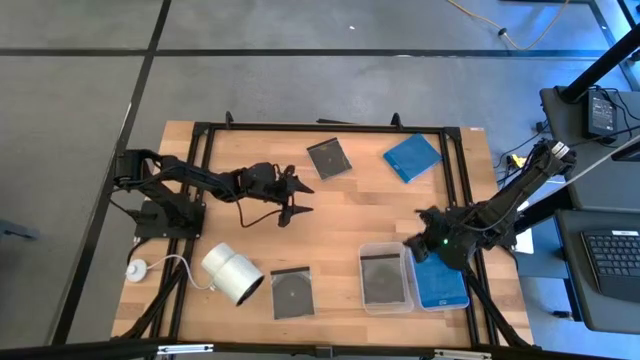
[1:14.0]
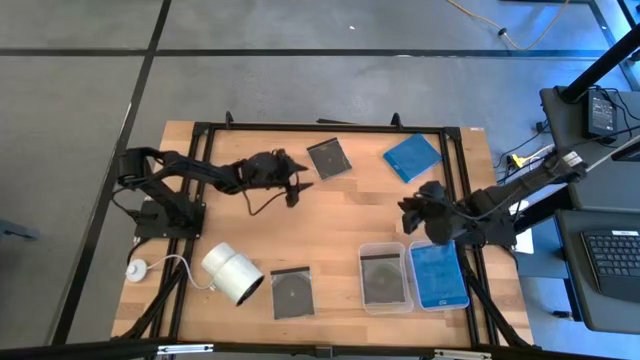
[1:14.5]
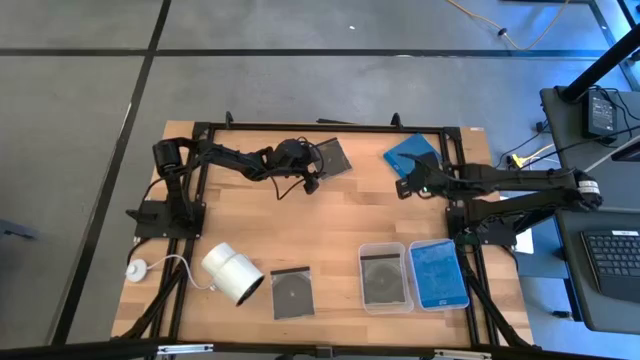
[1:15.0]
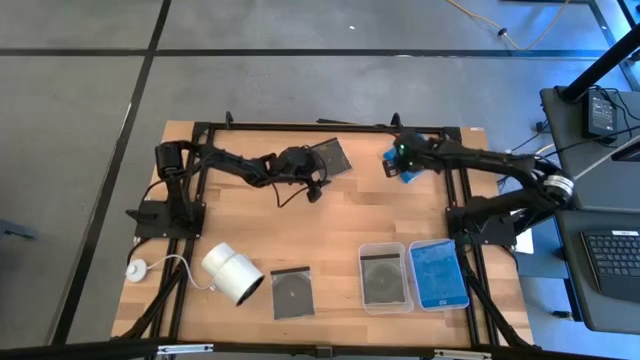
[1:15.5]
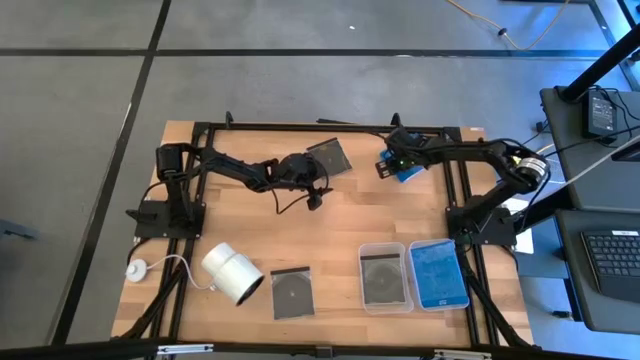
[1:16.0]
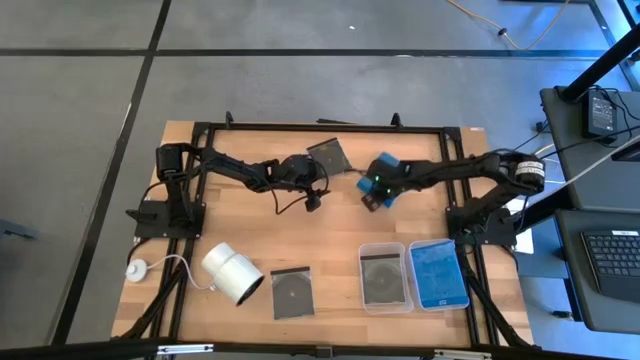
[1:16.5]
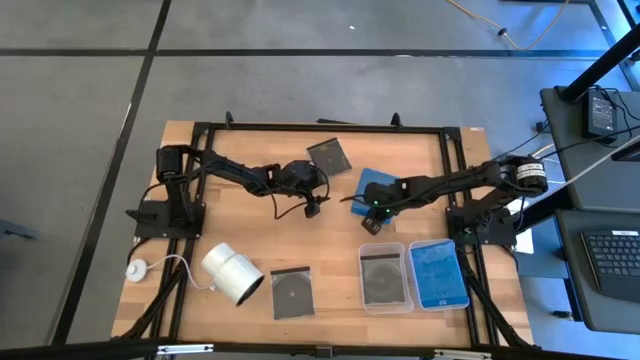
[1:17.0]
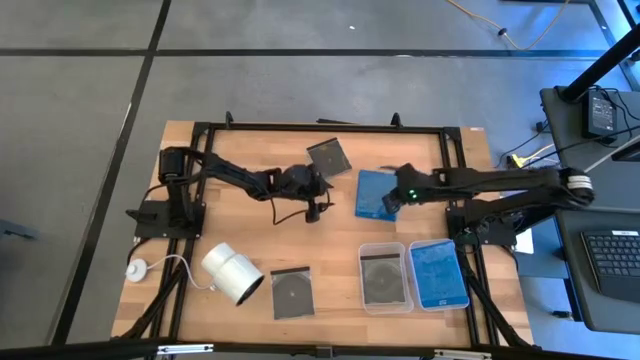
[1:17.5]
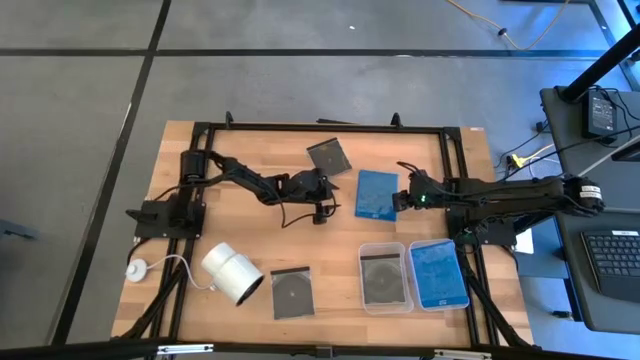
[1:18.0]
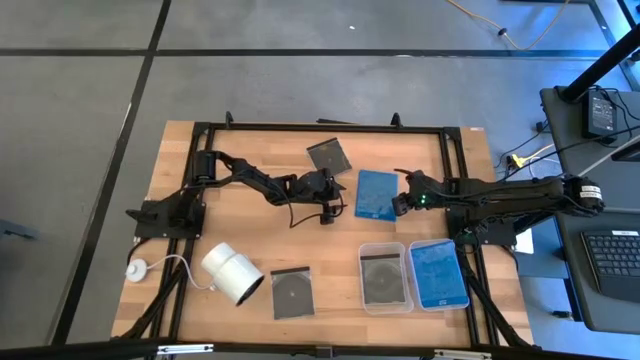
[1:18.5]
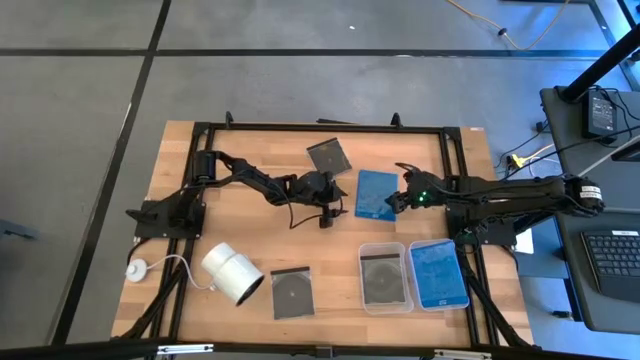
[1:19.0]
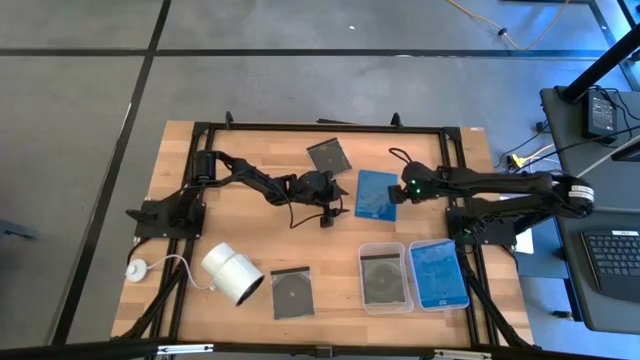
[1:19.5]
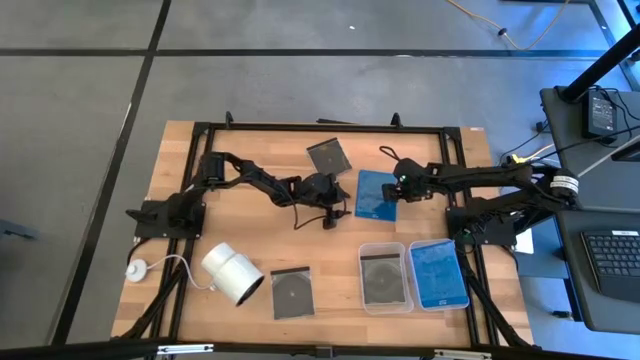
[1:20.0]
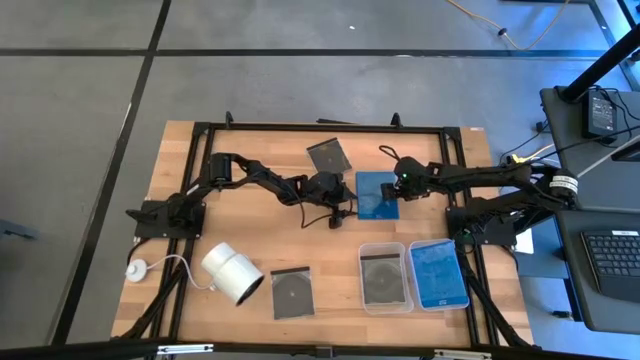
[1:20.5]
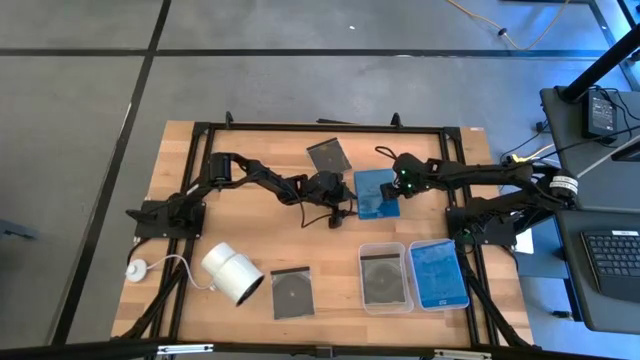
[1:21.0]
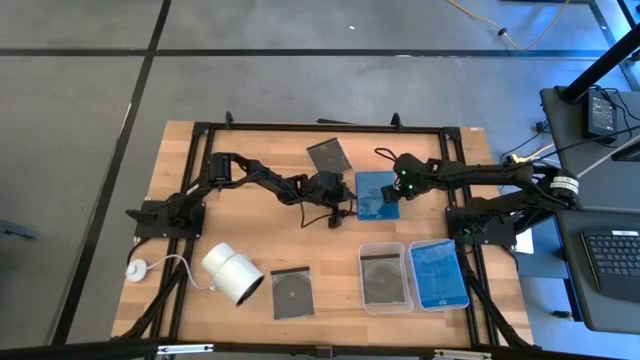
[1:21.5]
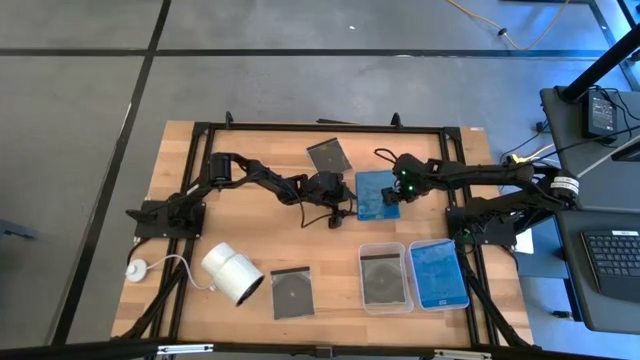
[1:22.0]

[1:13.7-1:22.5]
Task: Pick & place jewel cases by type
Put the blue CD case into the right transparent bin

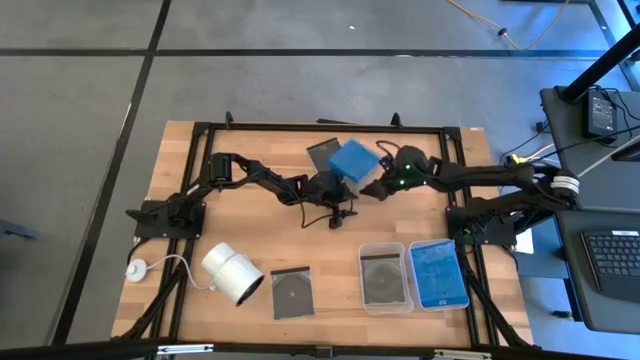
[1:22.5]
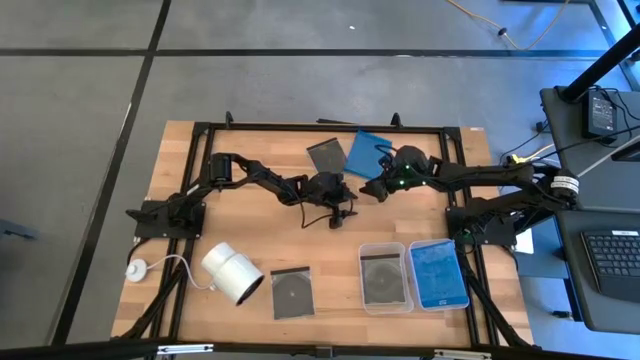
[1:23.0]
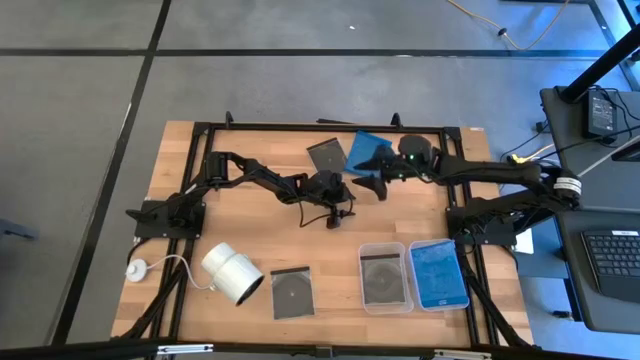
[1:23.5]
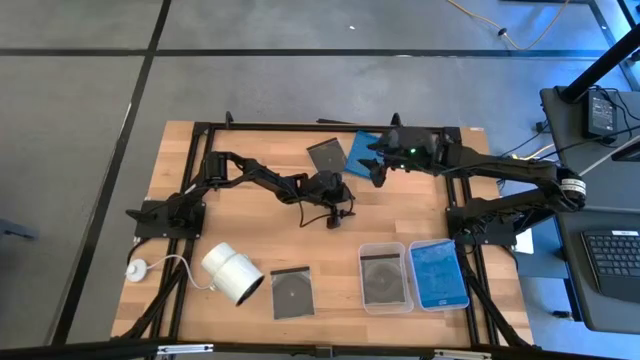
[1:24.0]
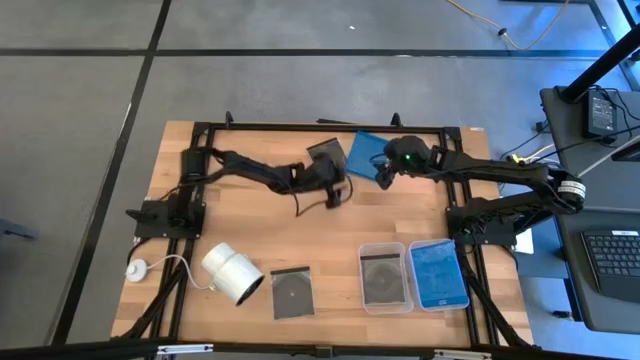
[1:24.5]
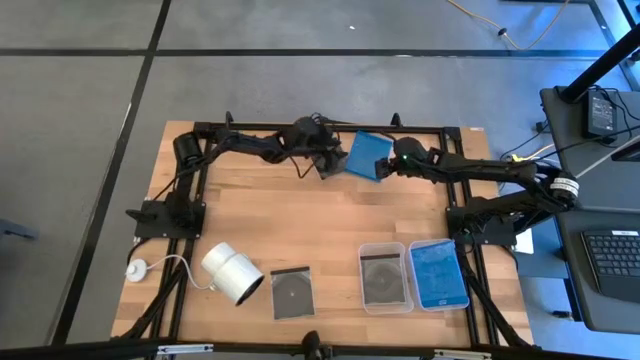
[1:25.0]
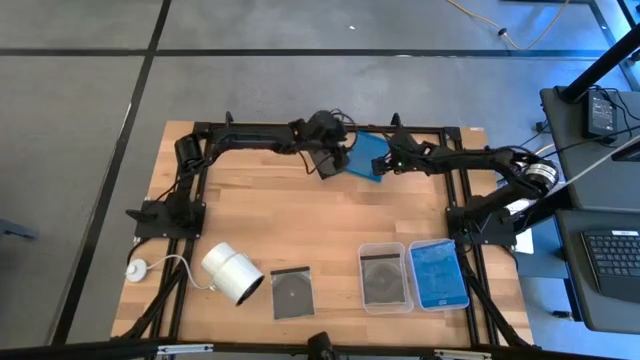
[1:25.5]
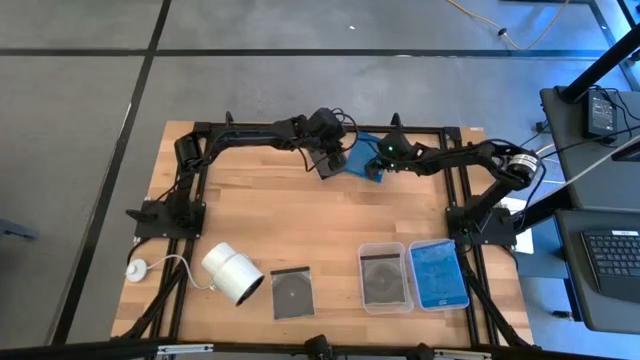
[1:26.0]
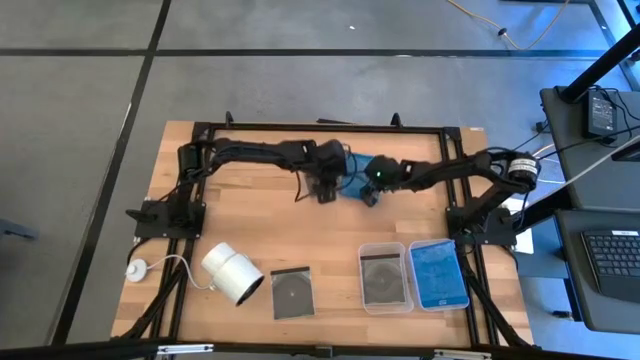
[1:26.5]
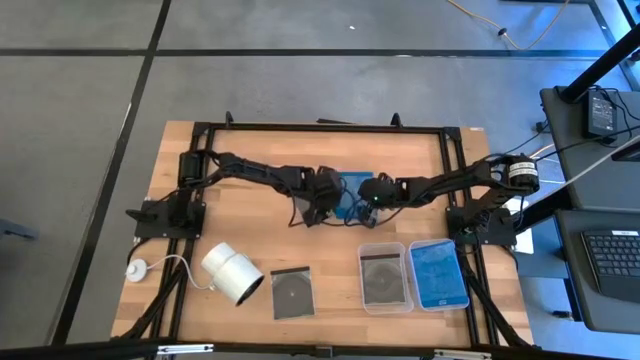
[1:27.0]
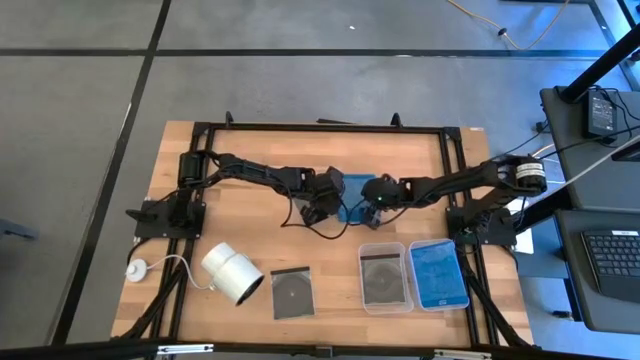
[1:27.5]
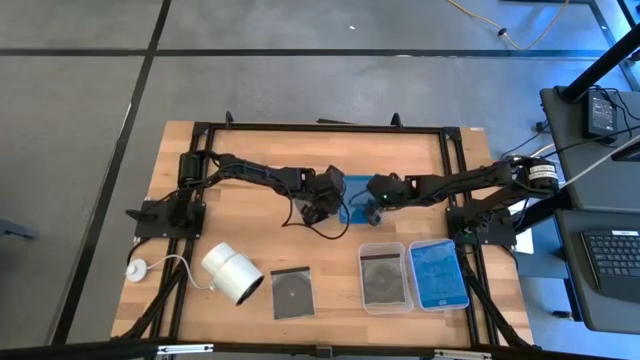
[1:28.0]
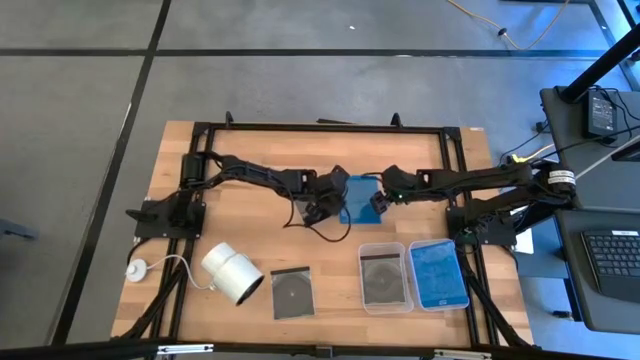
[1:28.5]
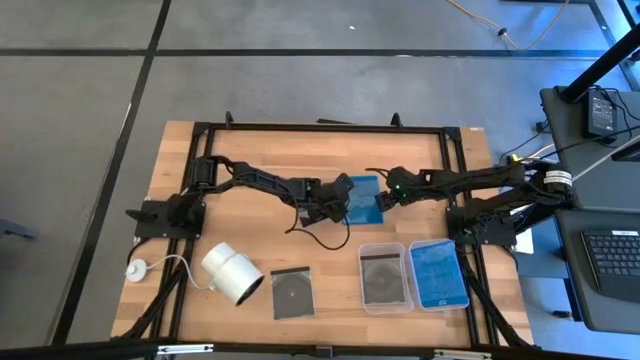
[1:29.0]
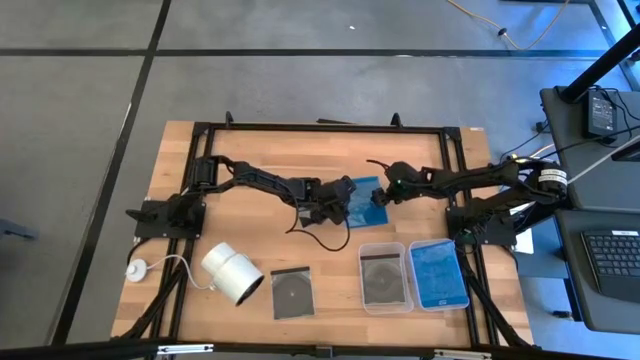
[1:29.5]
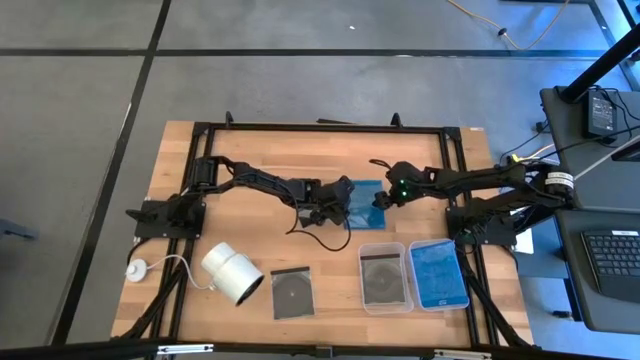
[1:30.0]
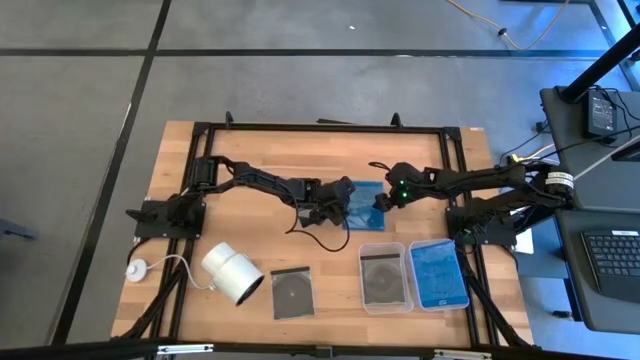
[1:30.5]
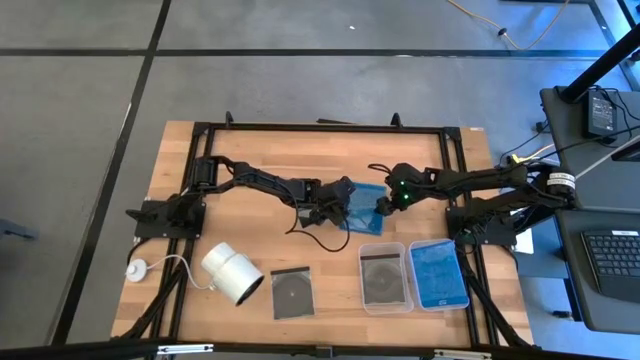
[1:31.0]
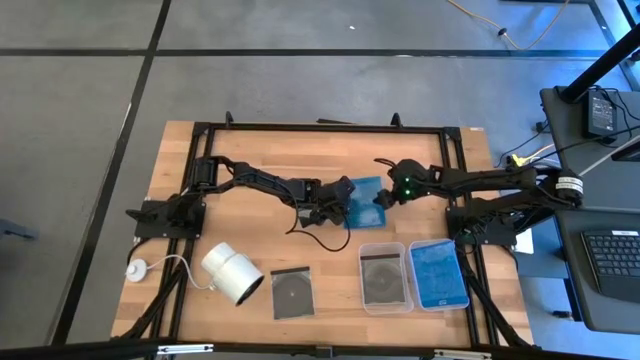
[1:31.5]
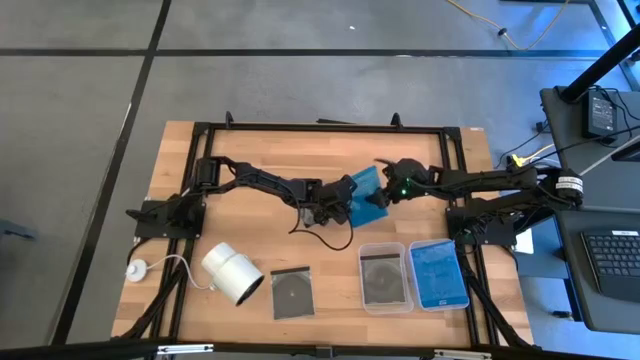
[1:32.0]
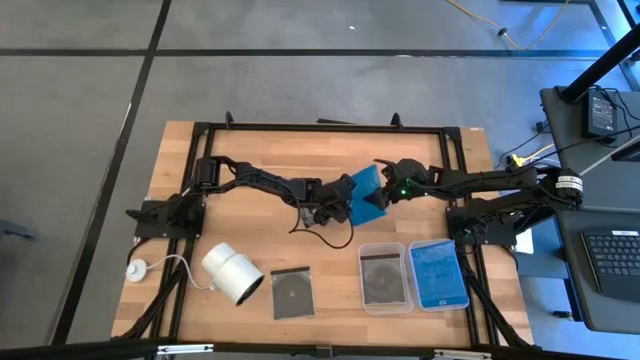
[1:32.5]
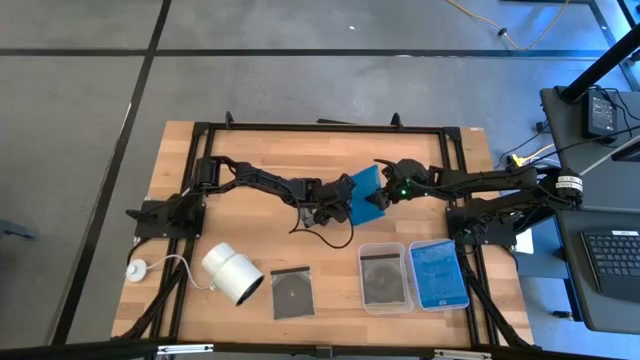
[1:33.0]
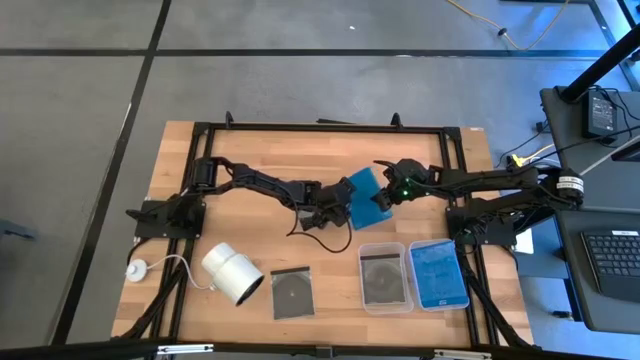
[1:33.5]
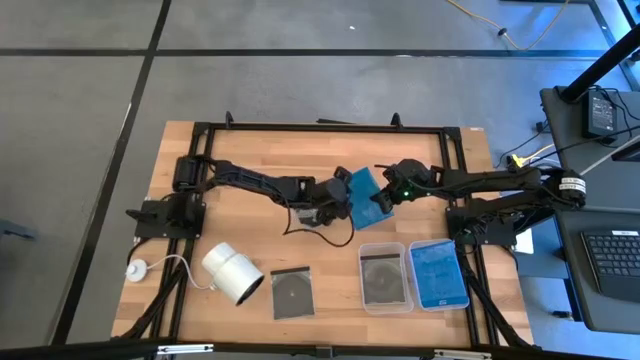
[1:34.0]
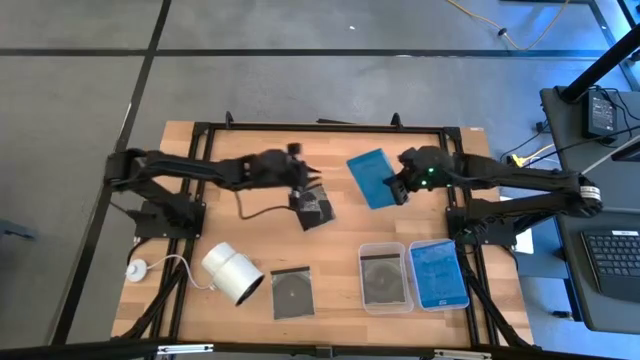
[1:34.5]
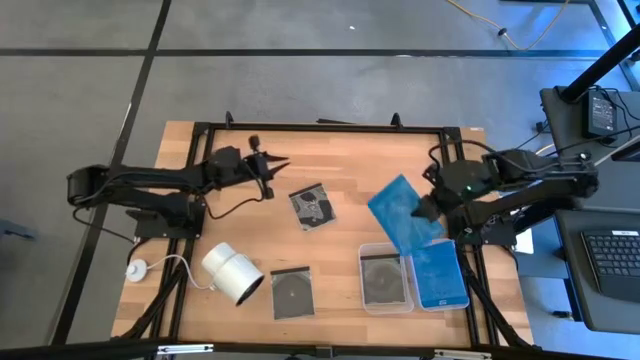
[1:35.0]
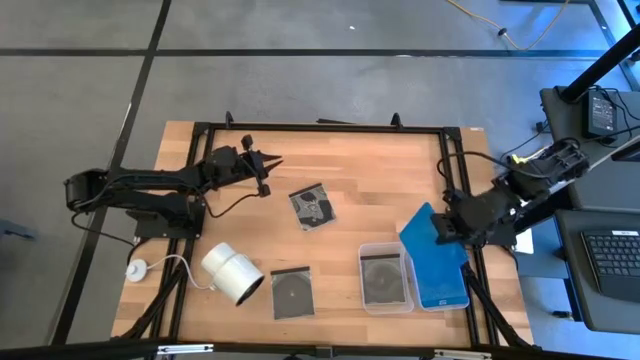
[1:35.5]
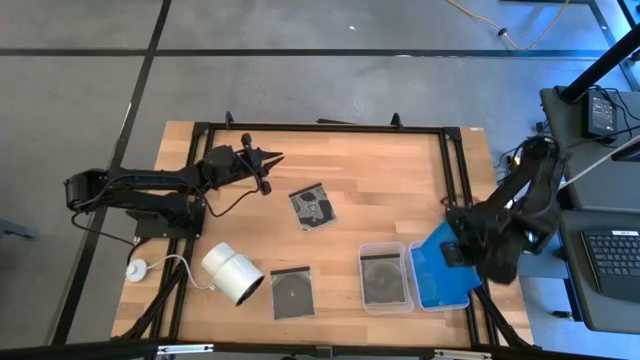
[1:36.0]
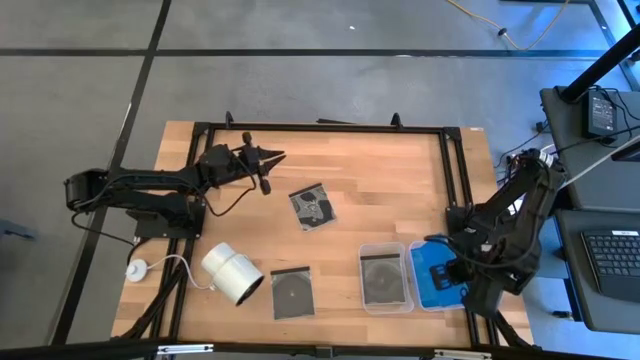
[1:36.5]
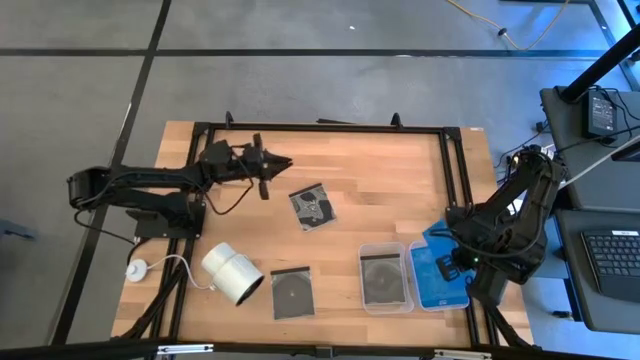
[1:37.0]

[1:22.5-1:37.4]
Put the blue CD case into the right transparent bin
